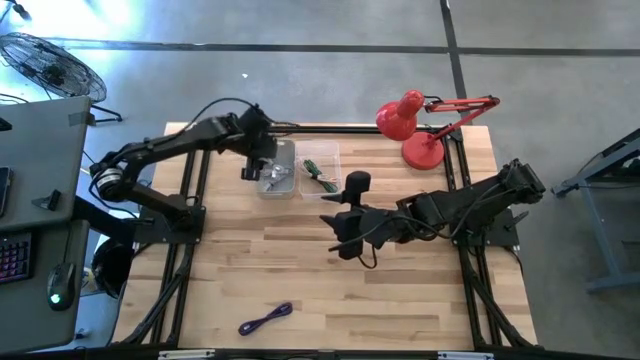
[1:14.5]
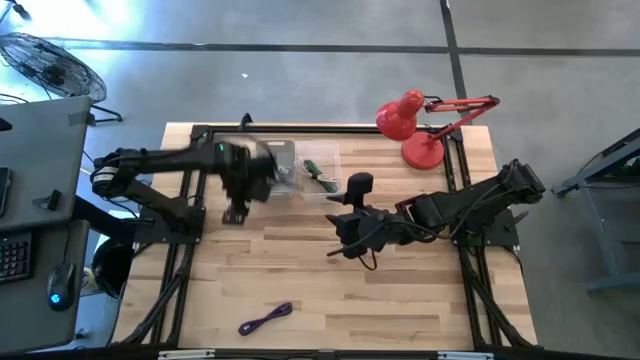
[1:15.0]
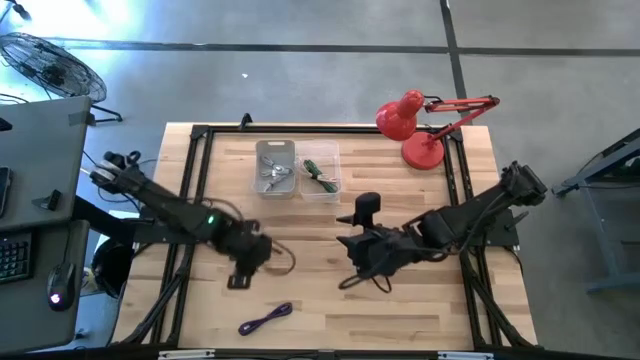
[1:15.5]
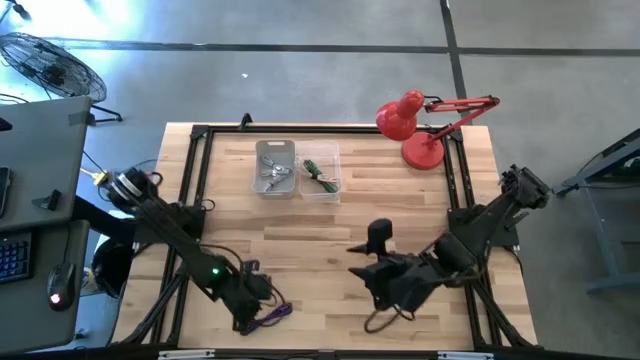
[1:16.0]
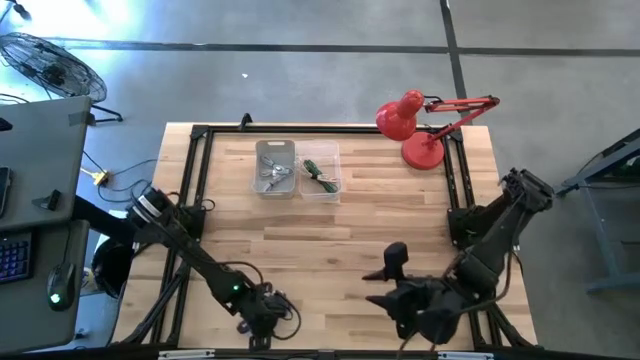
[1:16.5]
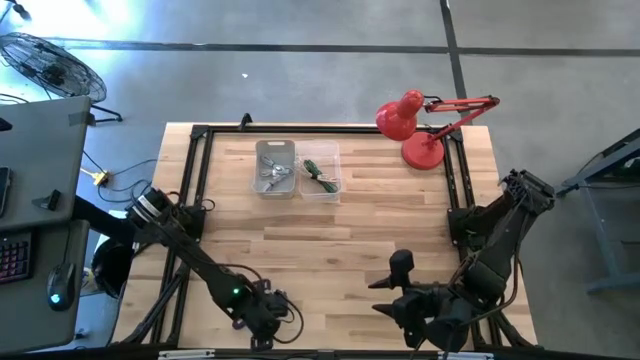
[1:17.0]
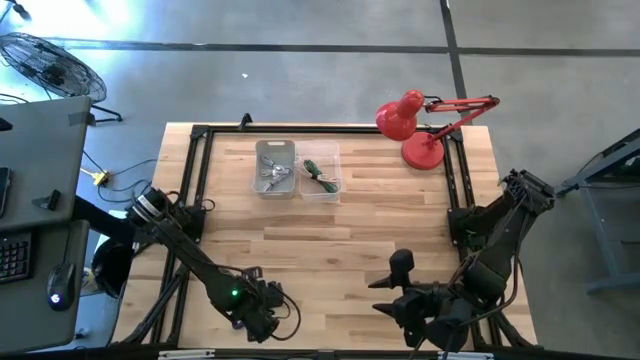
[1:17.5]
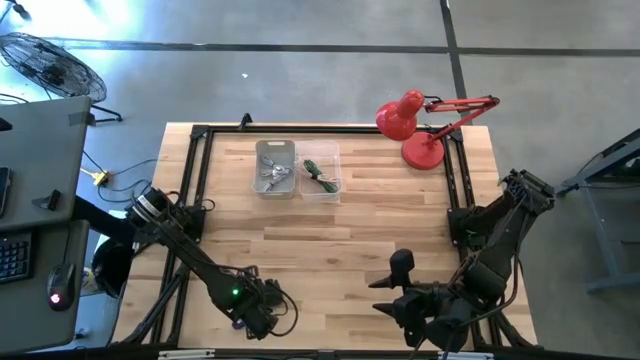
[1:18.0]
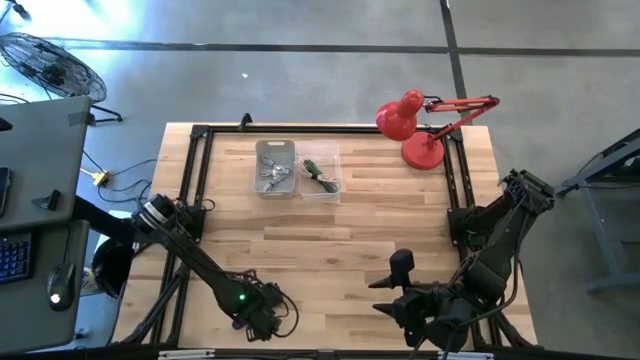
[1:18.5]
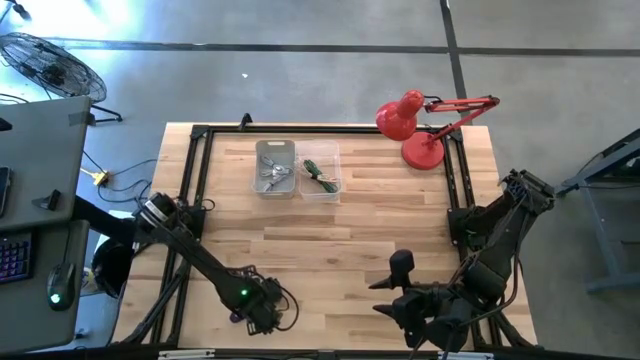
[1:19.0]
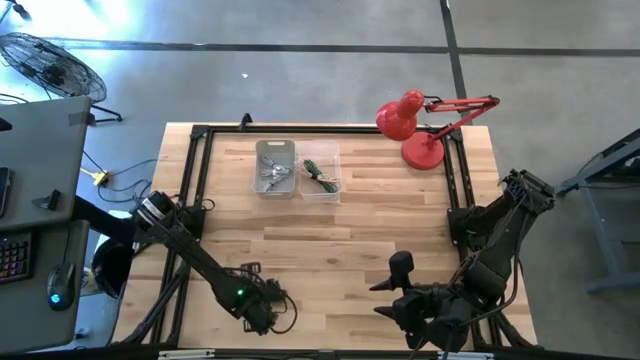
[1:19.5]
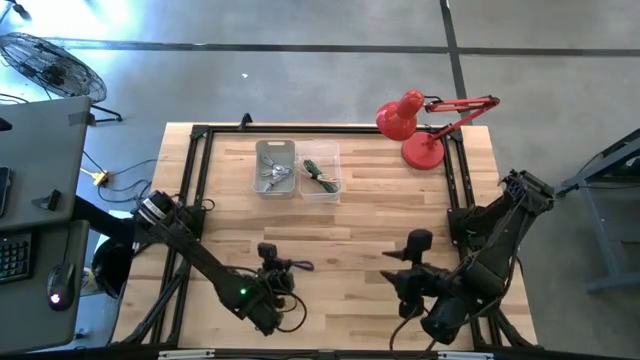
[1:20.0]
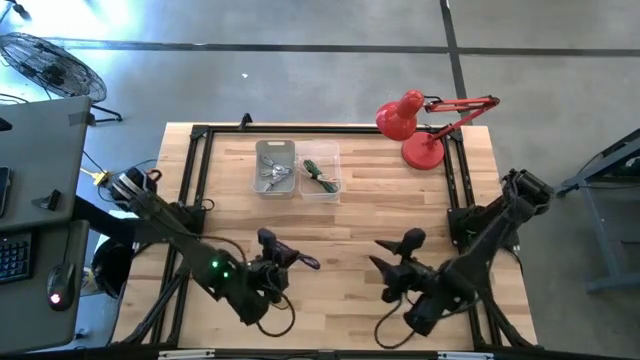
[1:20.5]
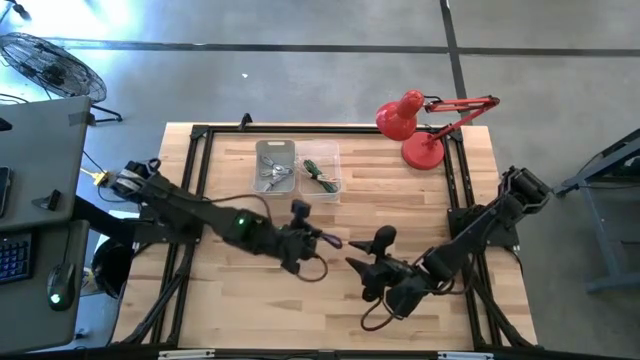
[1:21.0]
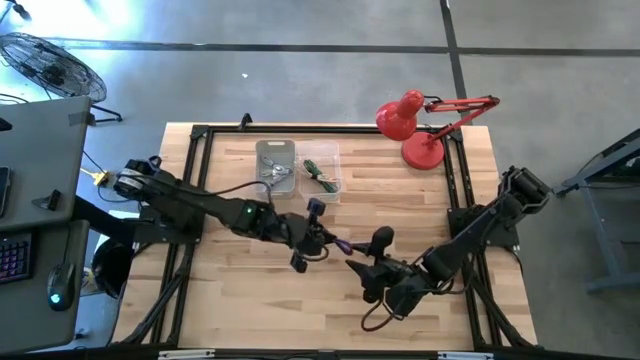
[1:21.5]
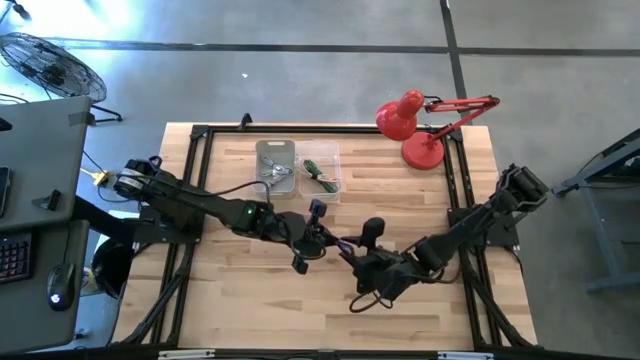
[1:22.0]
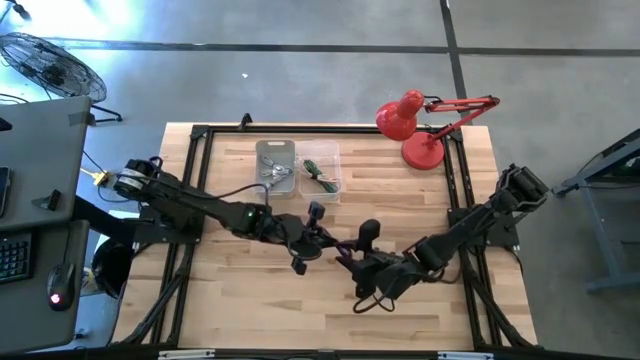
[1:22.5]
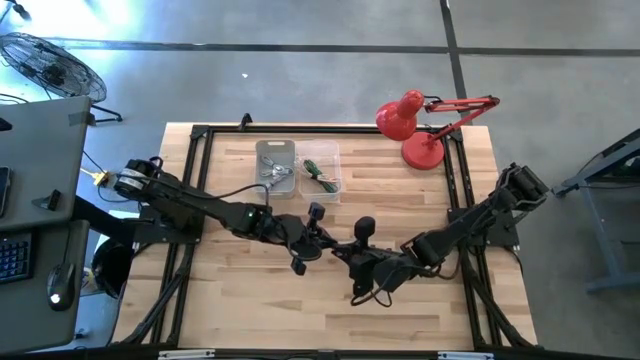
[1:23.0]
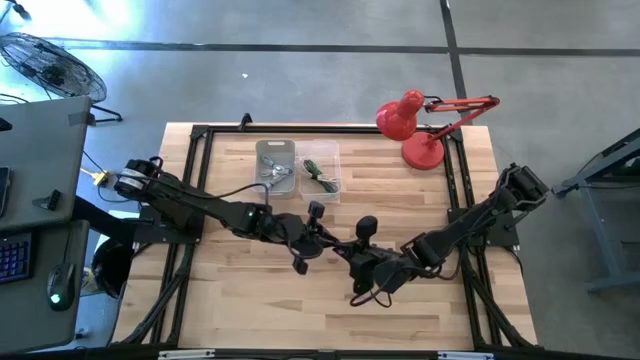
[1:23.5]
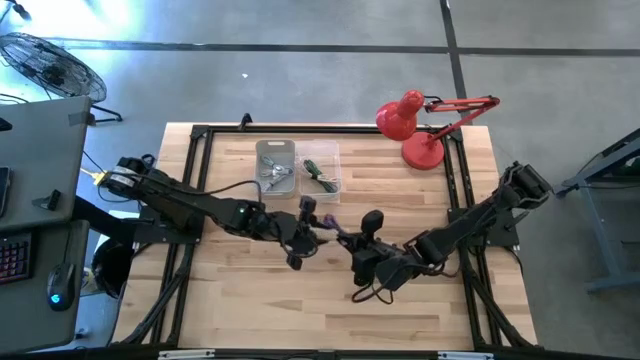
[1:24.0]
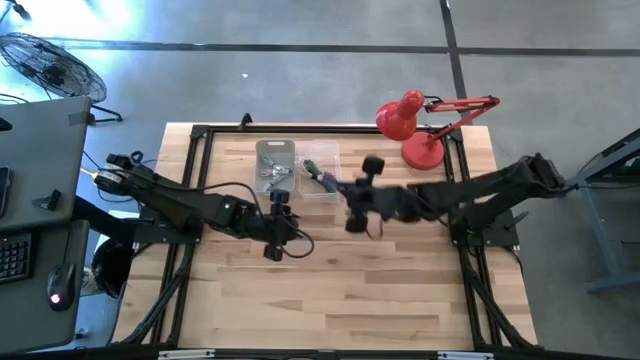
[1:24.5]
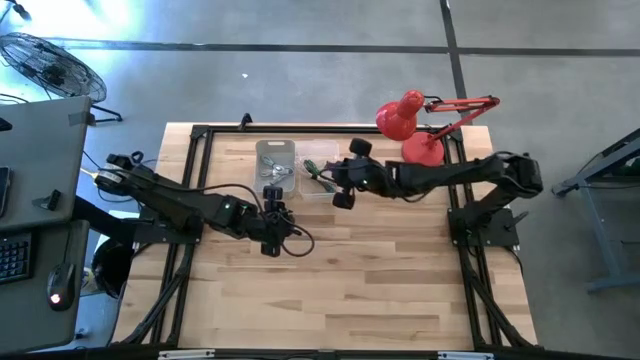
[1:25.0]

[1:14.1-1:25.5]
Task: Pick & Place USB Port
Put the purple patterned charger cable into the white bin

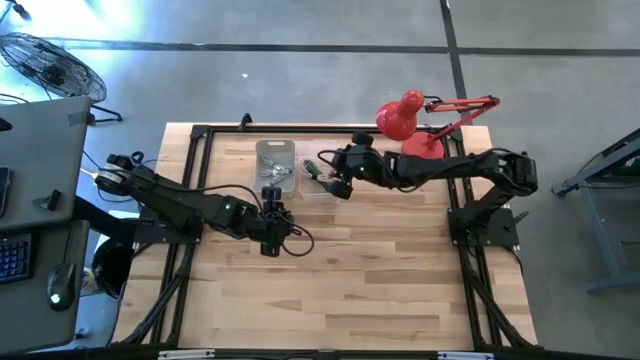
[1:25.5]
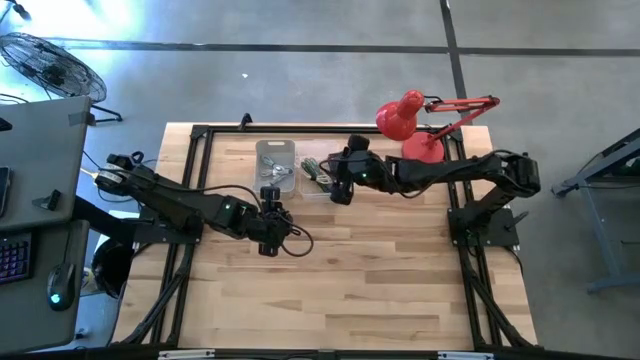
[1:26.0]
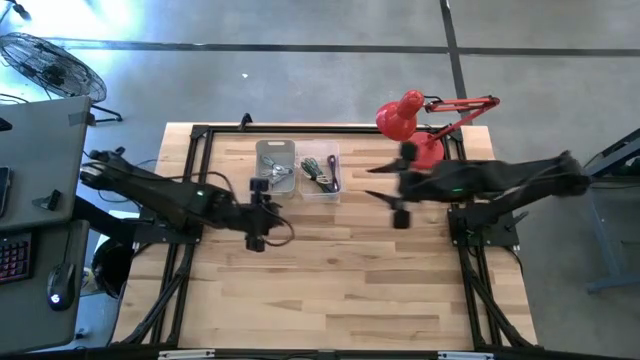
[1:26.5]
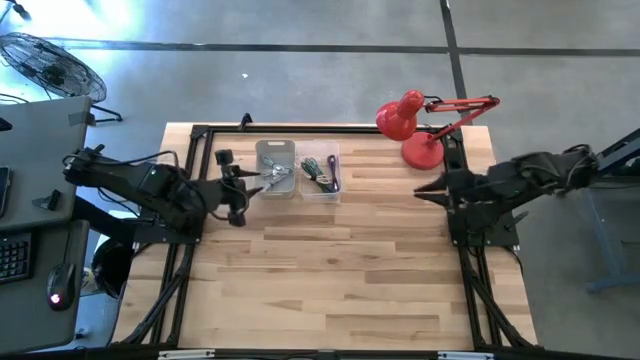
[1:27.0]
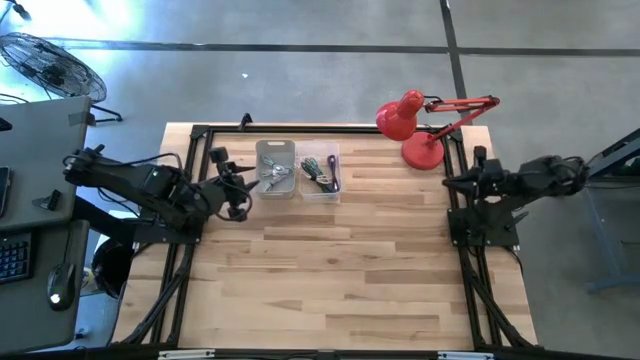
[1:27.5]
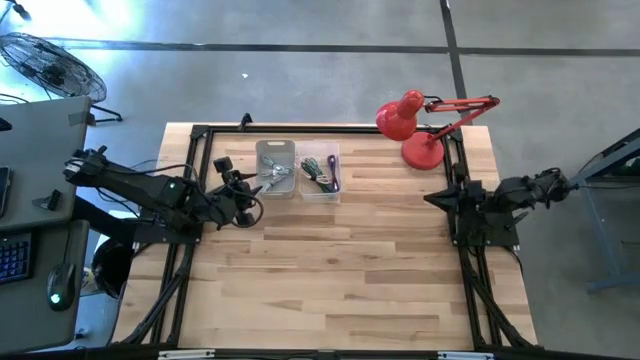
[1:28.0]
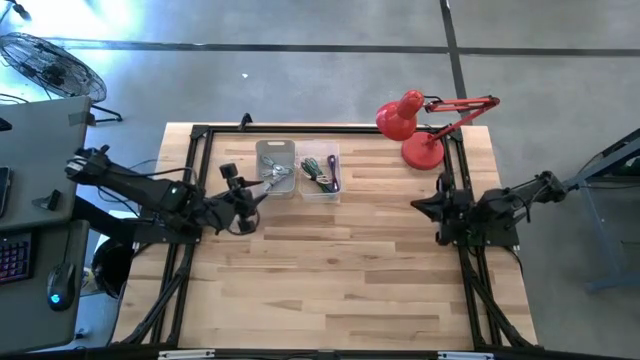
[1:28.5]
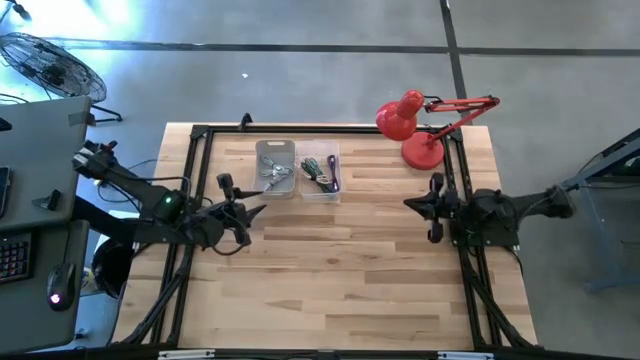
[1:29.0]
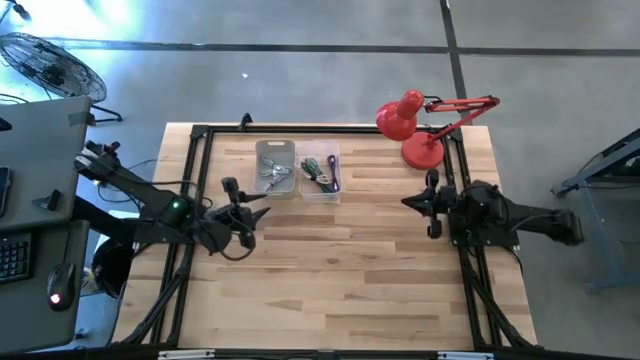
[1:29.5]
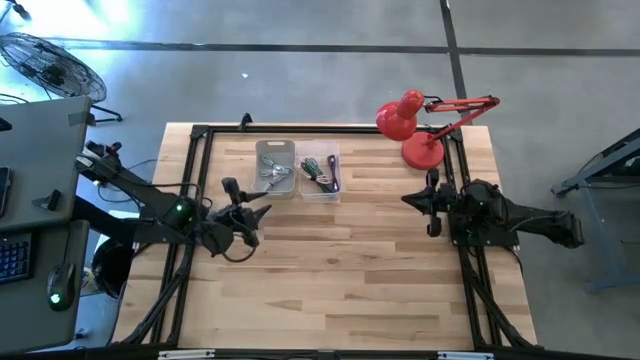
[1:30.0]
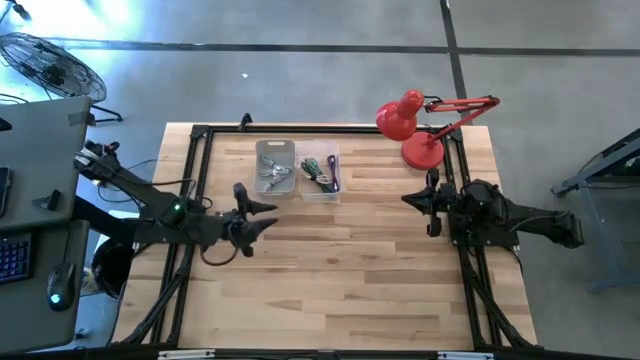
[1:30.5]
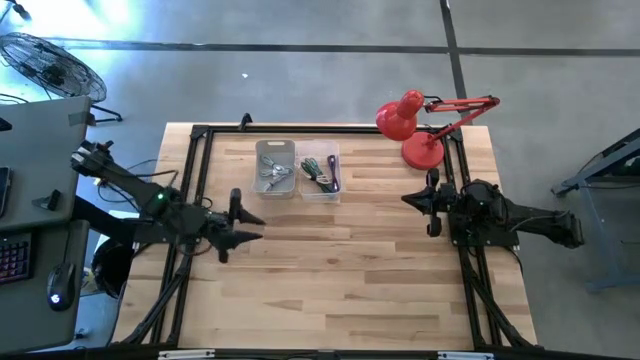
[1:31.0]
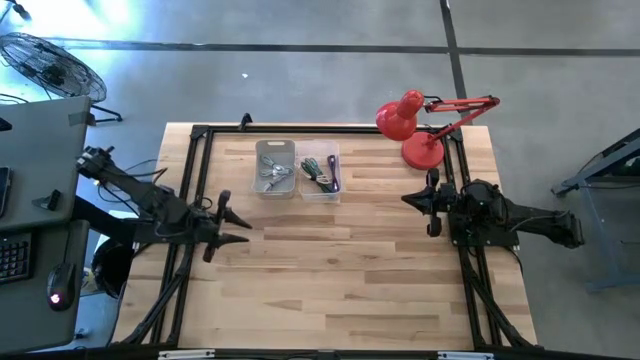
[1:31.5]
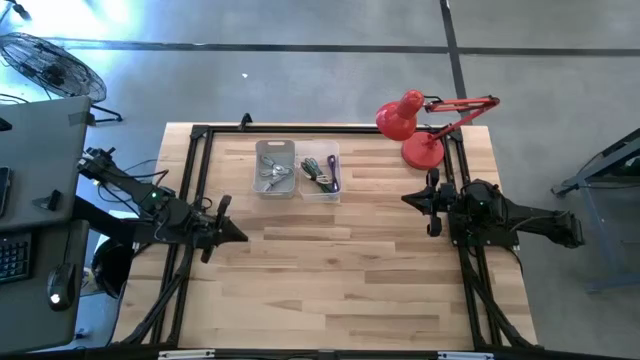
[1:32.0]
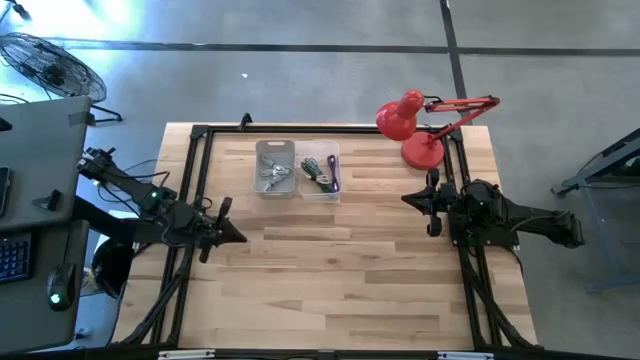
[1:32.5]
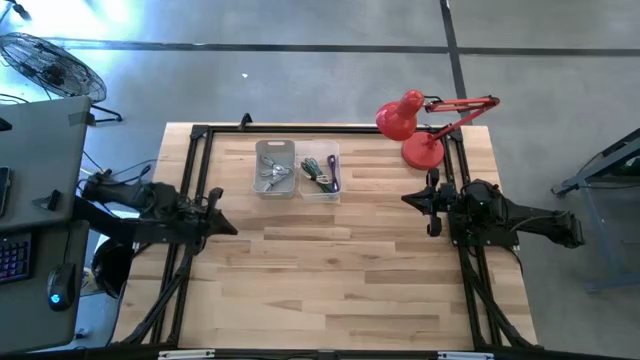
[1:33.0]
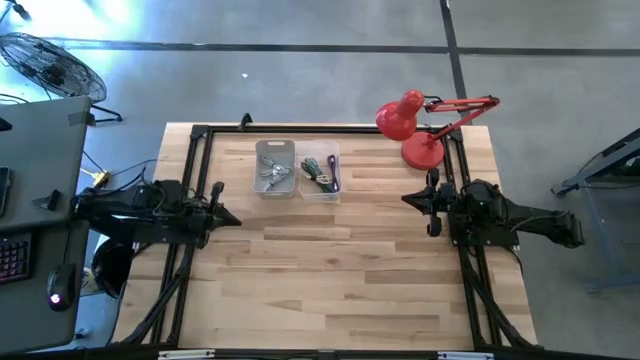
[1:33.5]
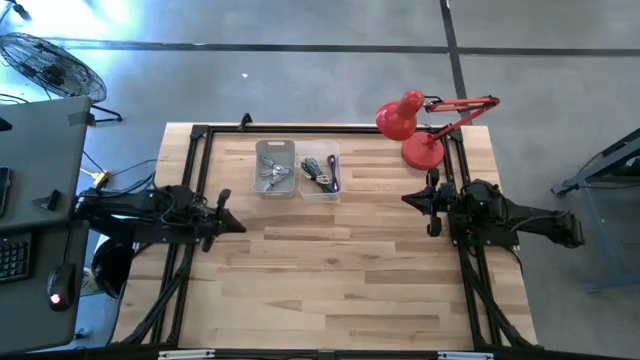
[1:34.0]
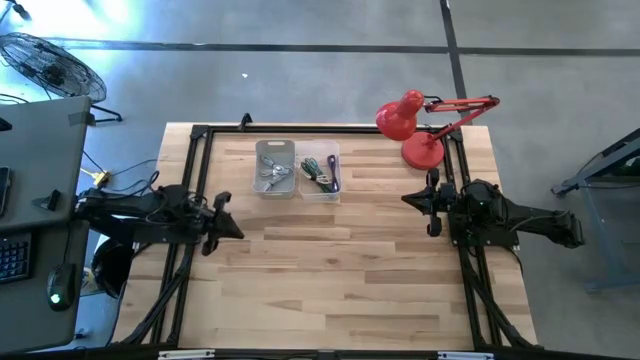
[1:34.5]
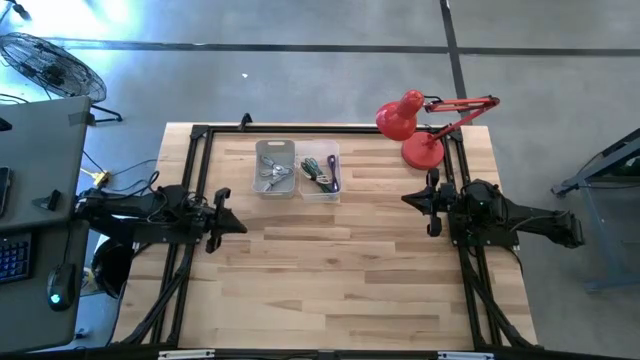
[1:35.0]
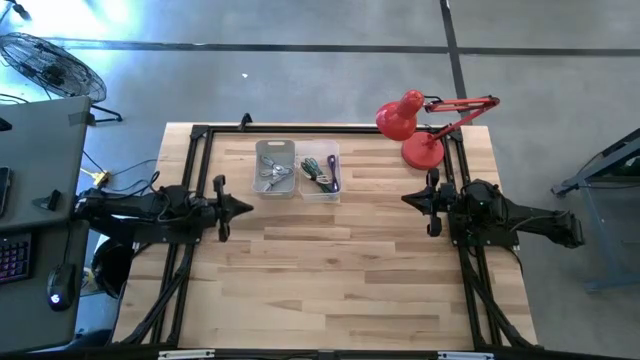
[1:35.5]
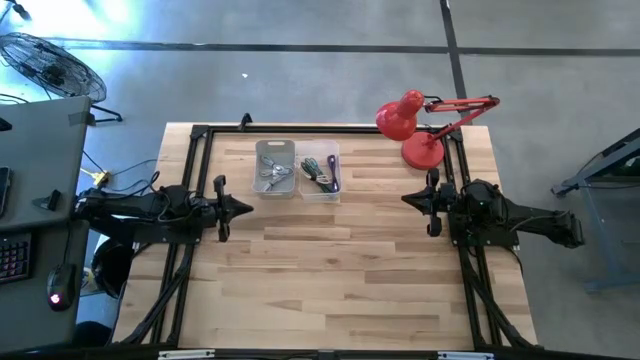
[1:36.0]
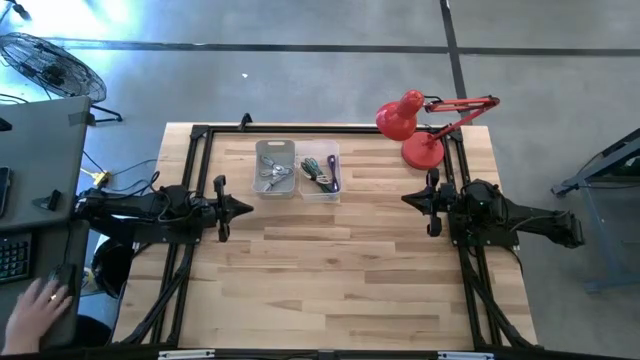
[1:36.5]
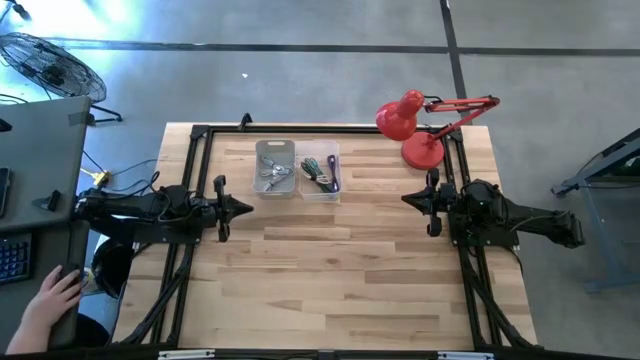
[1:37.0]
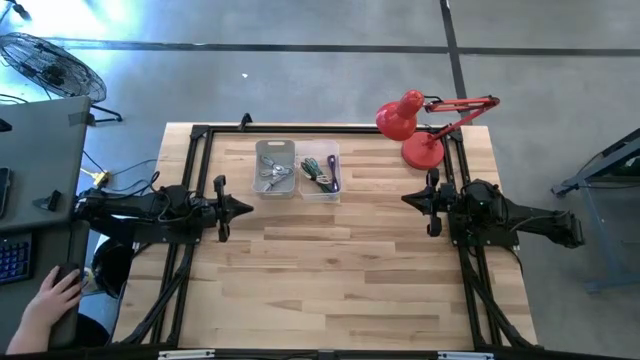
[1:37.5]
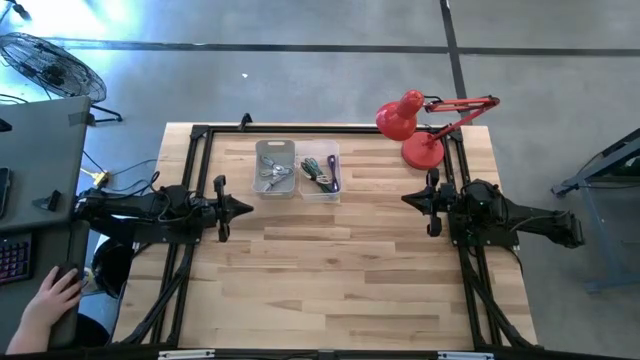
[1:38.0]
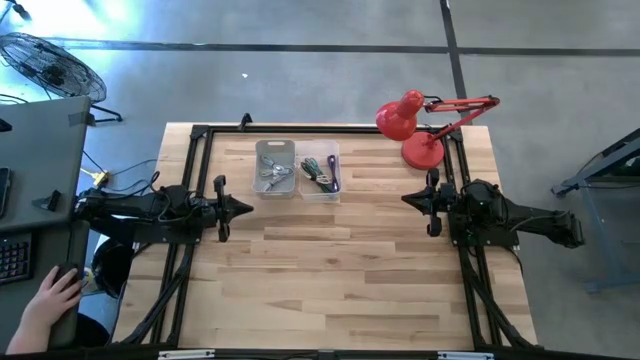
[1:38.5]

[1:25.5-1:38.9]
Return to Home Position
